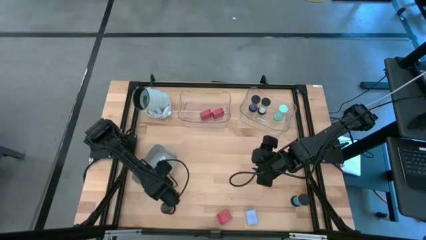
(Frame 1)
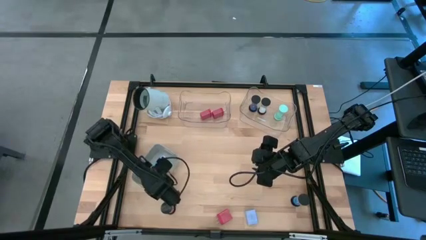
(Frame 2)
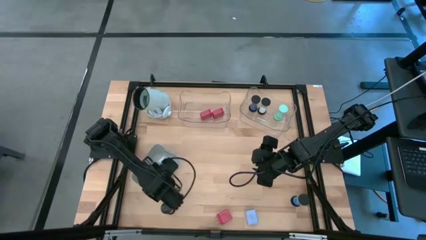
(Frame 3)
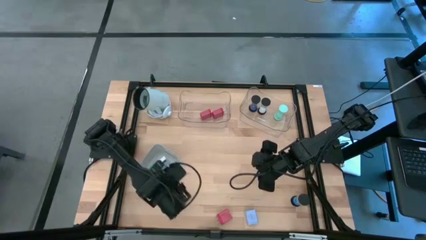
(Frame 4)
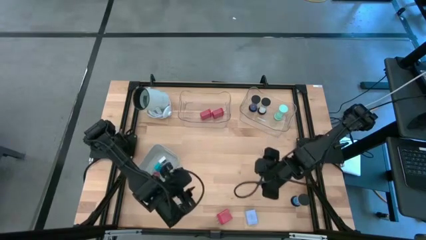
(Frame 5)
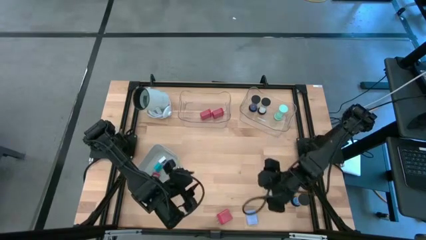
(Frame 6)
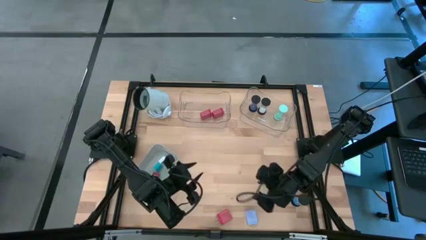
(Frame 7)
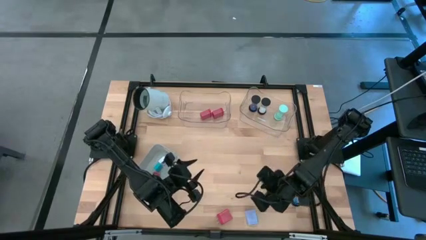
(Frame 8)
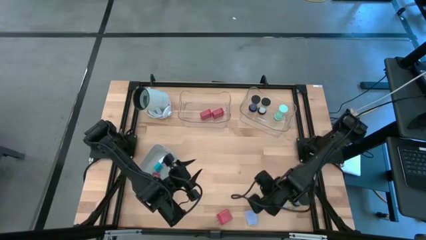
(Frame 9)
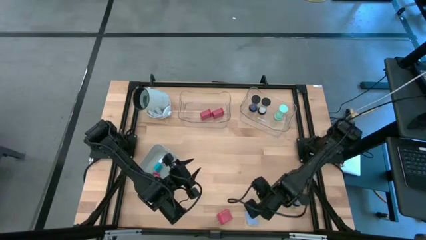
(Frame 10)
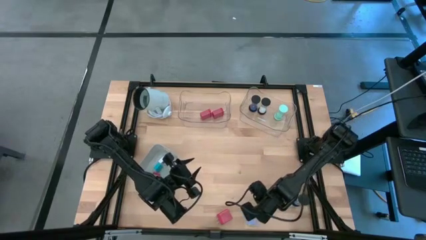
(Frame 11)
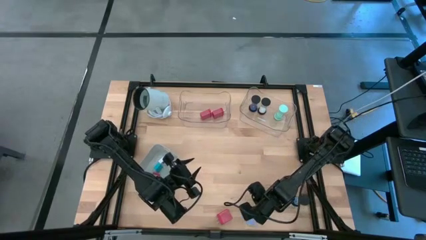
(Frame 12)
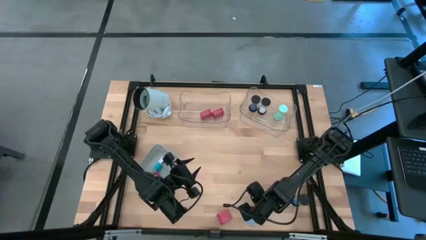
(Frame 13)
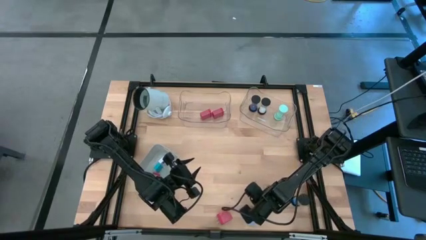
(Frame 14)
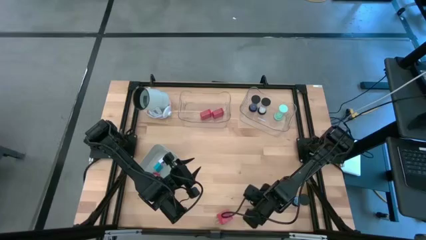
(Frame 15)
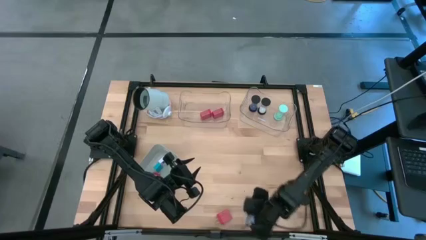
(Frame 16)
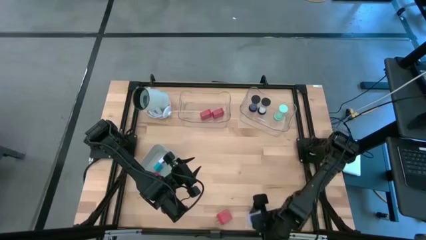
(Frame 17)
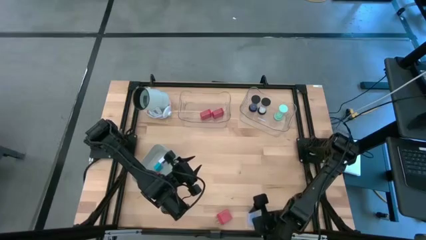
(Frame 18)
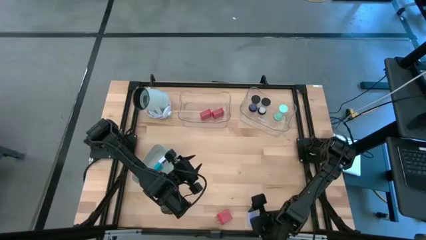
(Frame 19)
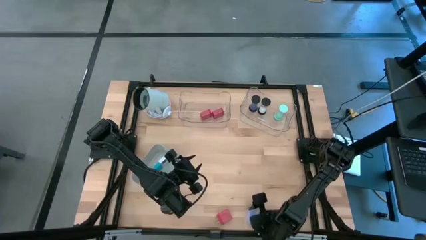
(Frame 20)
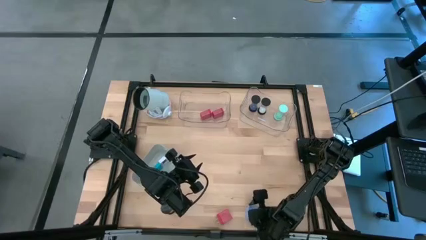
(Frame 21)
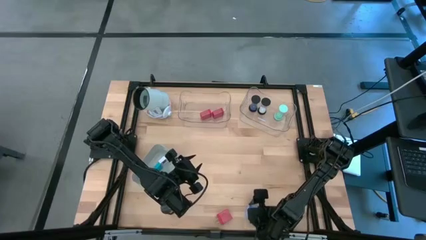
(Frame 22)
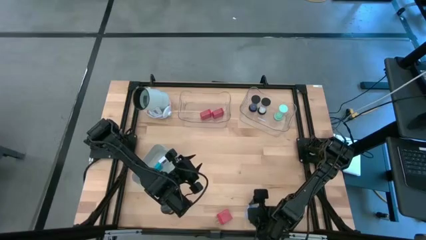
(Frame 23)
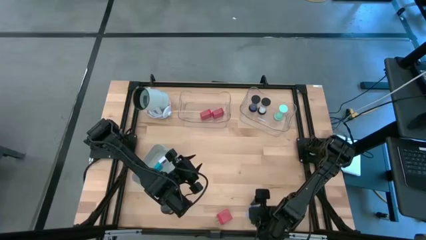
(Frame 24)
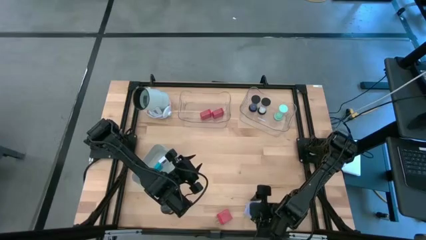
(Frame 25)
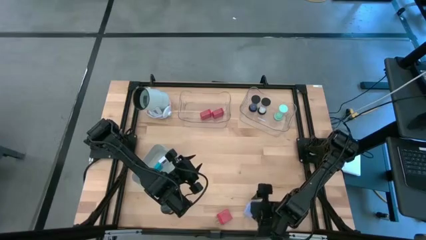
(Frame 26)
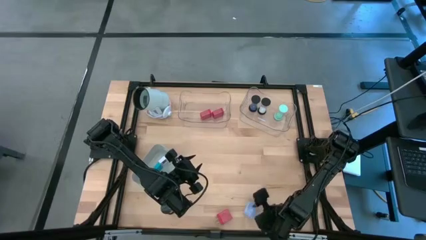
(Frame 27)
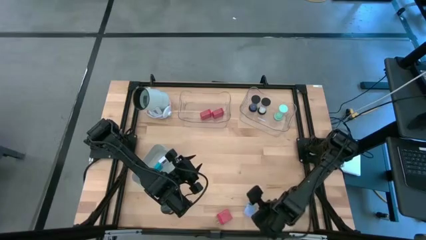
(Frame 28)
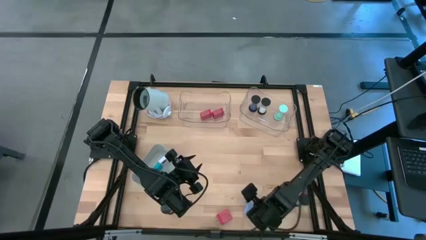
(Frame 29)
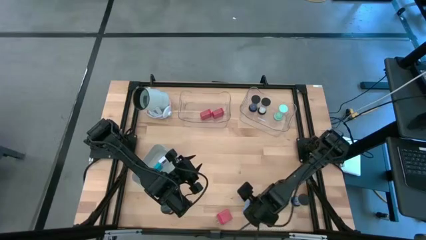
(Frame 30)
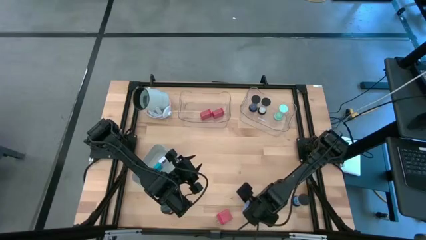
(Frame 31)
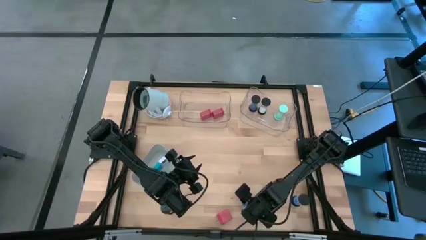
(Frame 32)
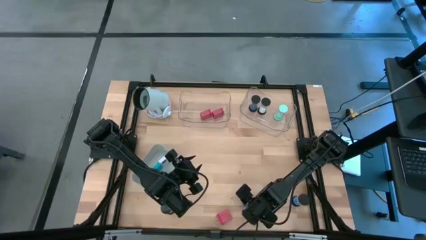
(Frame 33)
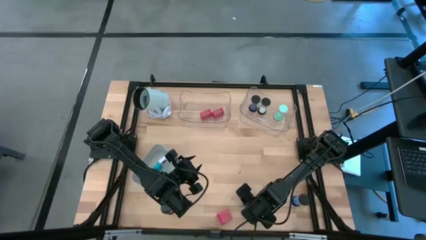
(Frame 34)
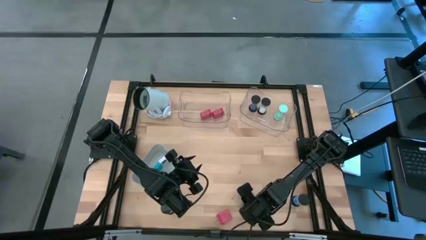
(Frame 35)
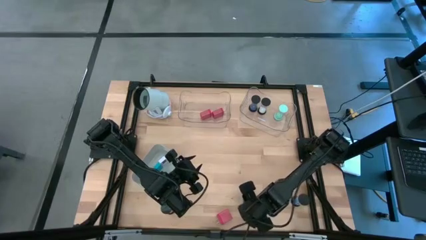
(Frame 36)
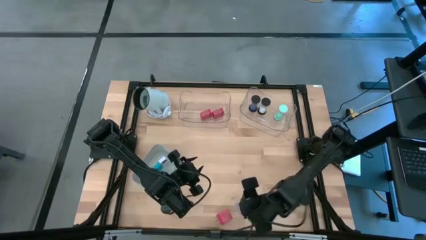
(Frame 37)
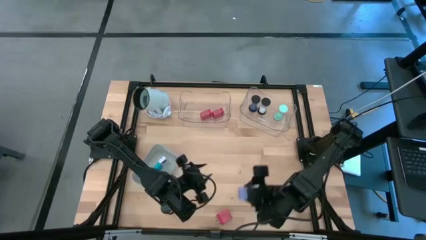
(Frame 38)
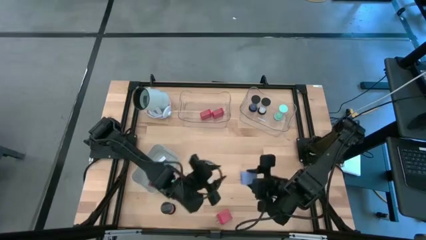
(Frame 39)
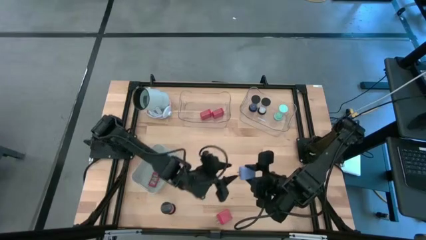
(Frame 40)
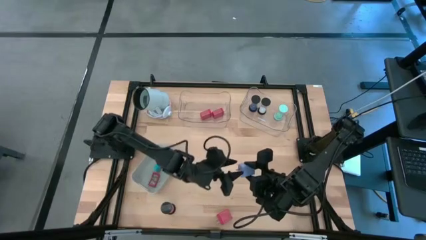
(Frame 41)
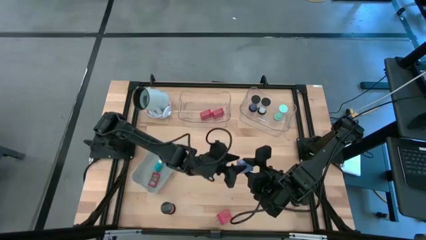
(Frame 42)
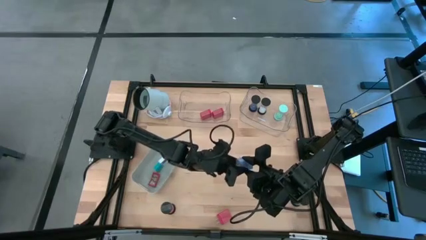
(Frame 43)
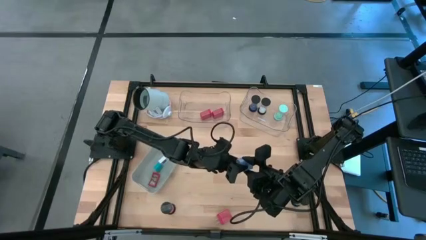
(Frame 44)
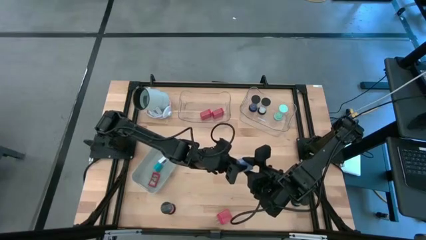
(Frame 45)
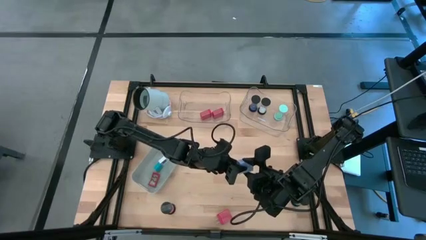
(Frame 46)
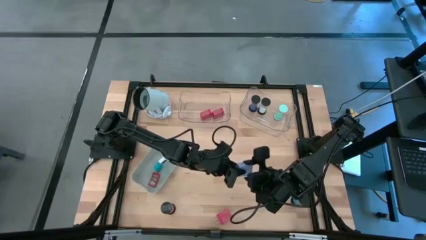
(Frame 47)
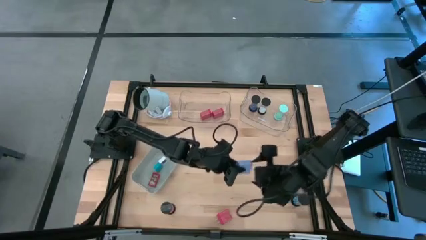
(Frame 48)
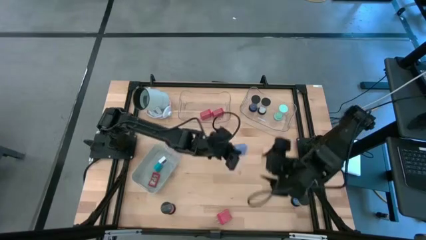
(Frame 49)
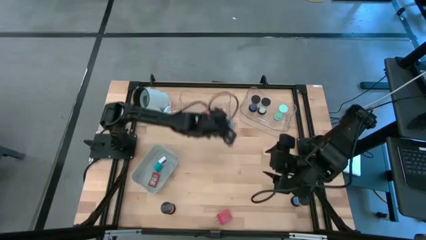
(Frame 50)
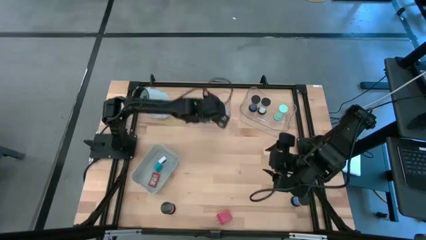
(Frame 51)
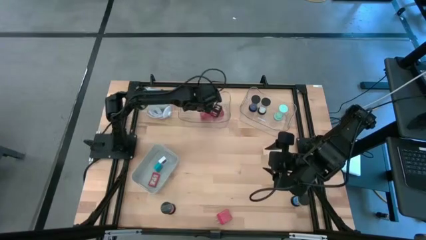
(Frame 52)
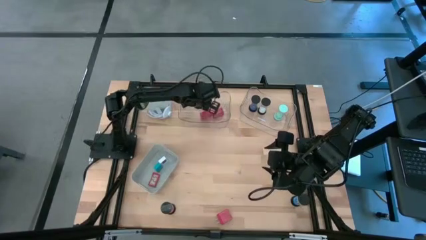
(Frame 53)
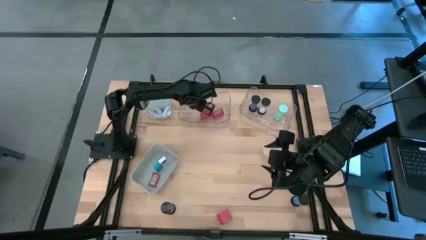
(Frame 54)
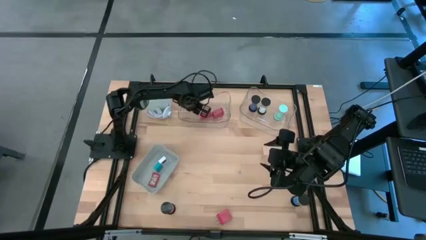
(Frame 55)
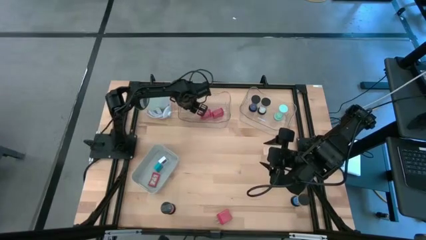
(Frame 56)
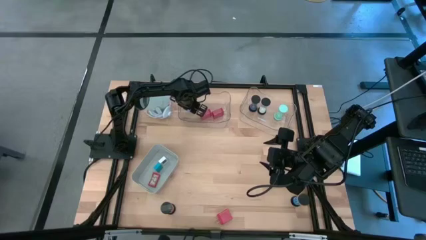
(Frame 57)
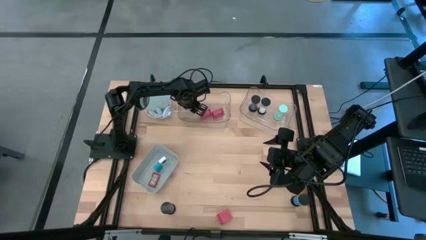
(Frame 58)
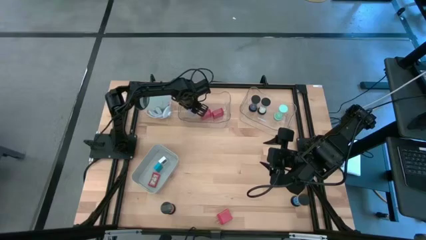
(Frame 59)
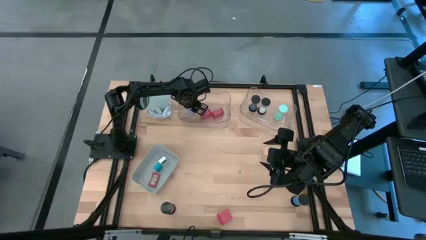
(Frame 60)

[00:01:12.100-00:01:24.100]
Task: Pick & Place Office items
Put the blue charger adapter into the left transparent bin

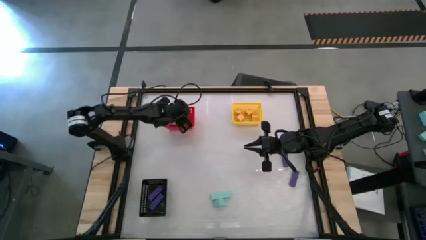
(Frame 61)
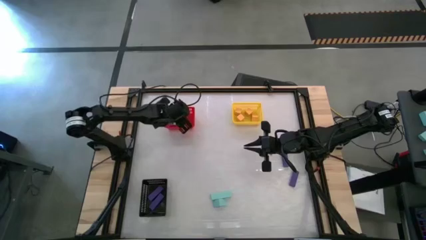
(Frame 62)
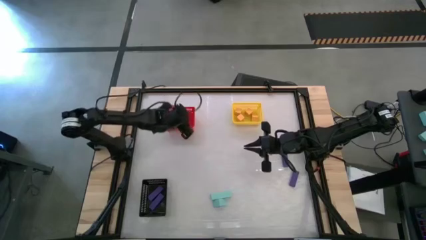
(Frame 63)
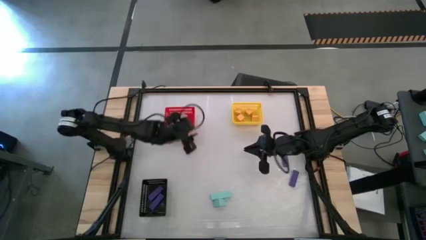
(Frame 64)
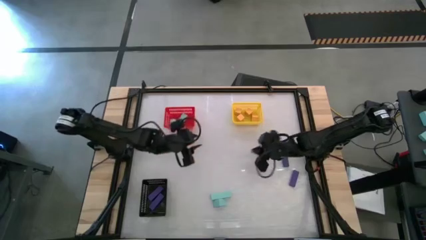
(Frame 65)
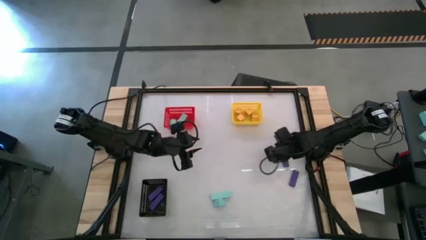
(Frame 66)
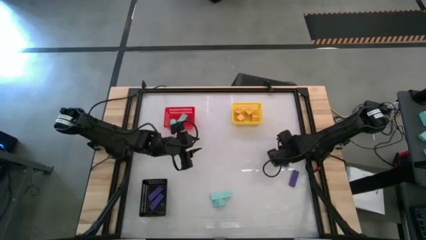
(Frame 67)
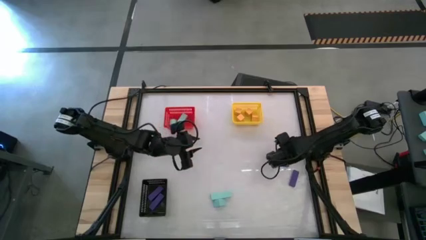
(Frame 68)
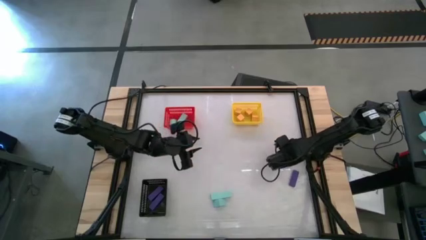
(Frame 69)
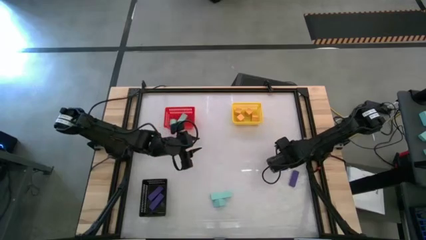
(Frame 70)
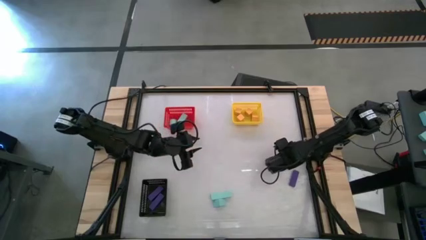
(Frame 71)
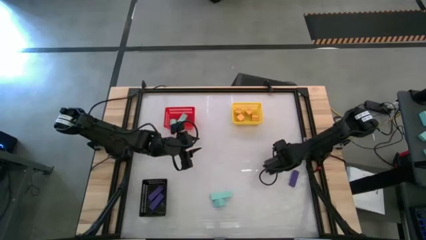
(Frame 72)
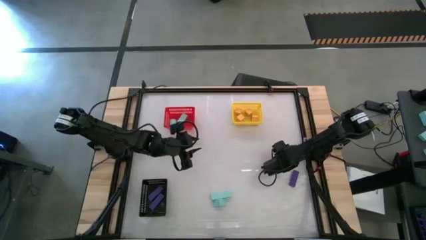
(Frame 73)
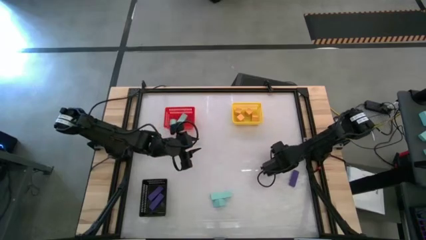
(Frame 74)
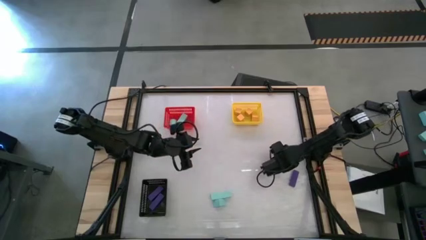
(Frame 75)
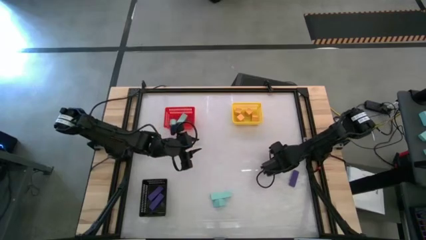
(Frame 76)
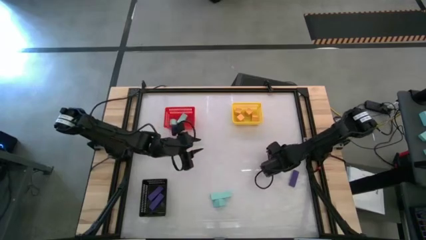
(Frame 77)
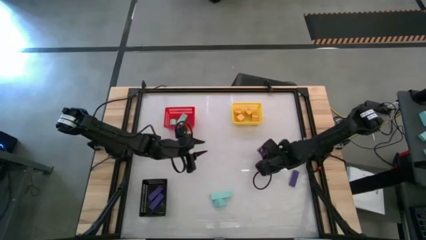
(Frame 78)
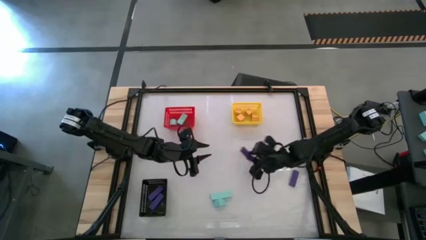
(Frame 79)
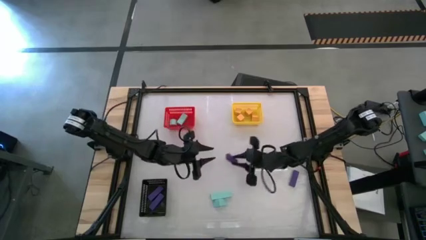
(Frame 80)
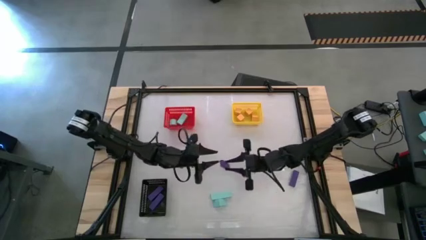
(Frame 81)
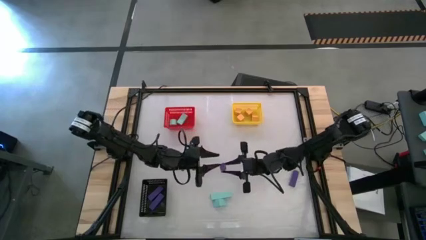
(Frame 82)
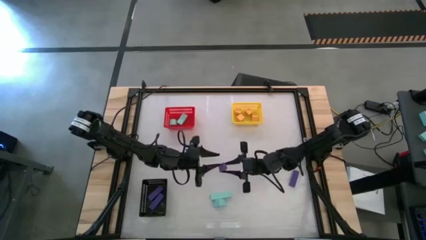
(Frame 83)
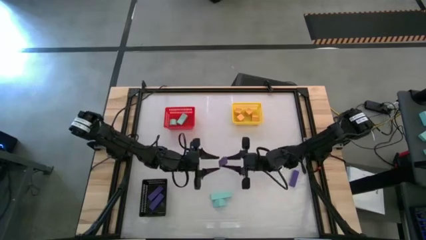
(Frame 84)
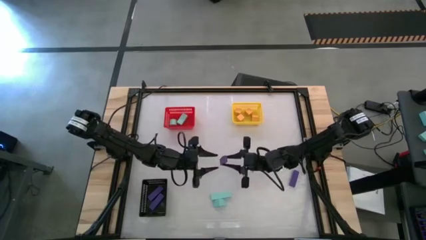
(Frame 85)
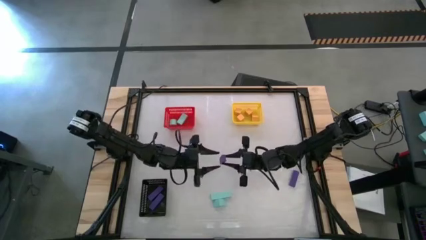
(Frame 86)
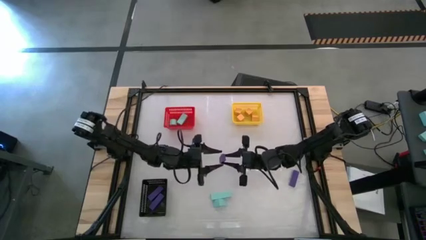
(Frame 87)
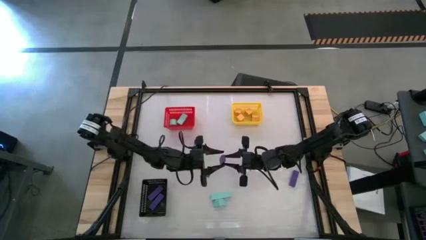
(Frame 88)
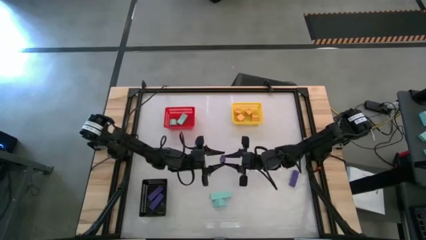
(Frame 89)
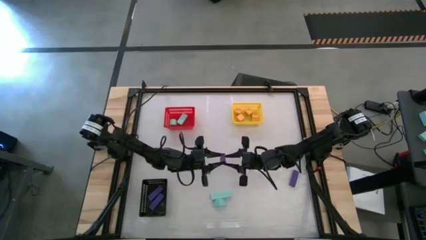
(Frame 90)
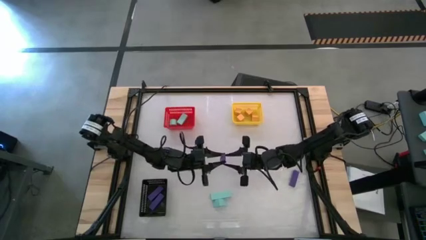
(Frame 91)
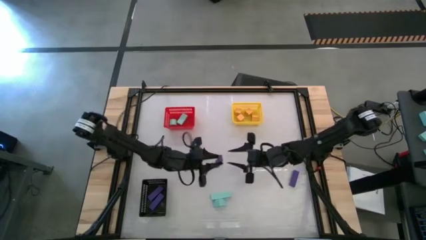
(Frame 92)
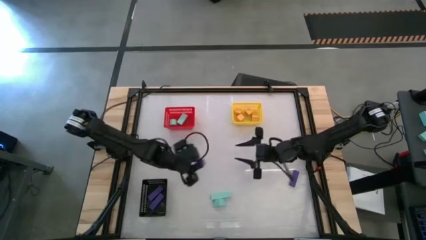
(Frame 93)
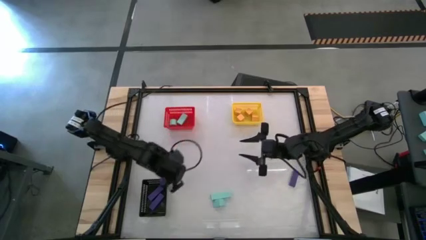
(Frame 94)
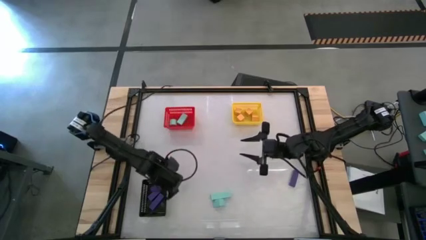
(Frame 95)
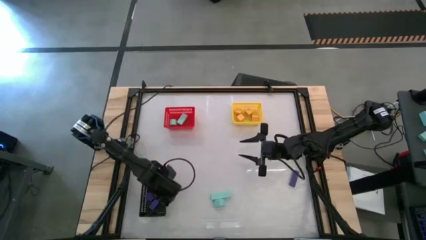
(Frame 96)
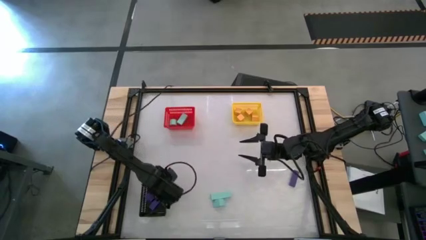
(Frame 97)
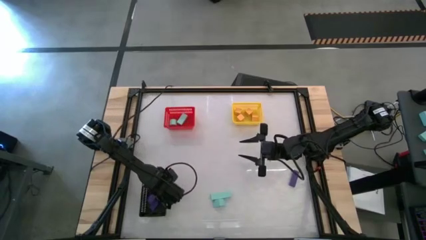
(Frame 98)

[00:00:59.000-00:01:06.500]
Task: Sort & place blocks by color
Put the purple block into the black bin
